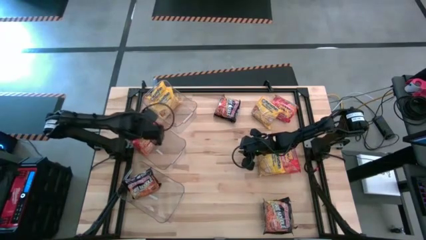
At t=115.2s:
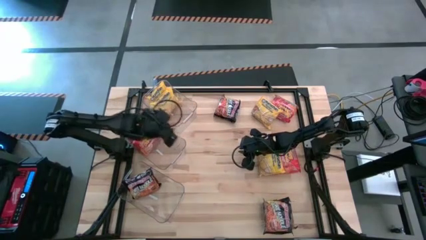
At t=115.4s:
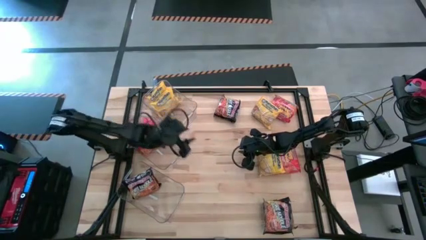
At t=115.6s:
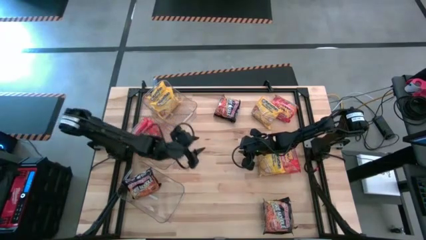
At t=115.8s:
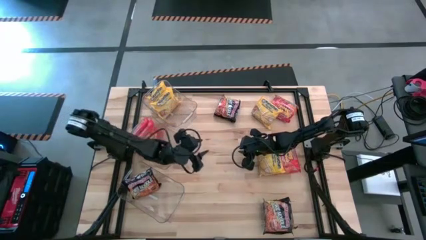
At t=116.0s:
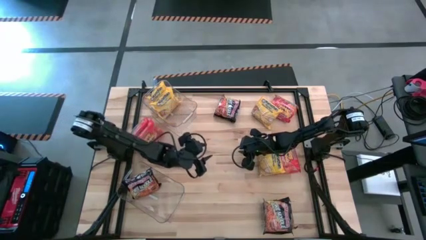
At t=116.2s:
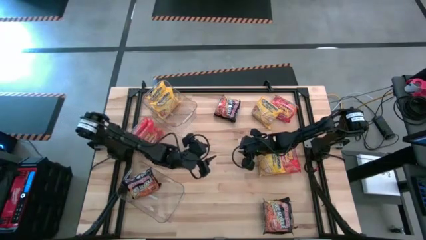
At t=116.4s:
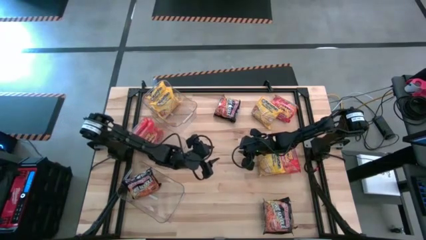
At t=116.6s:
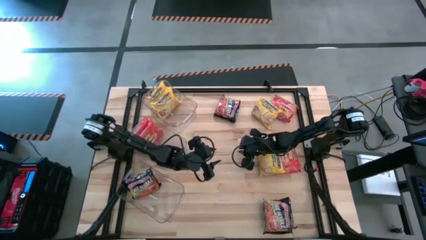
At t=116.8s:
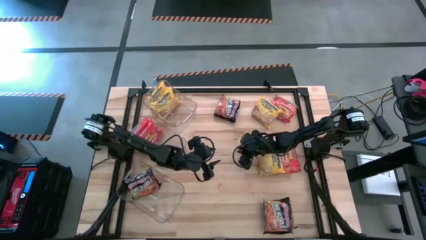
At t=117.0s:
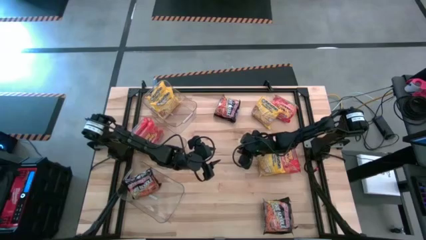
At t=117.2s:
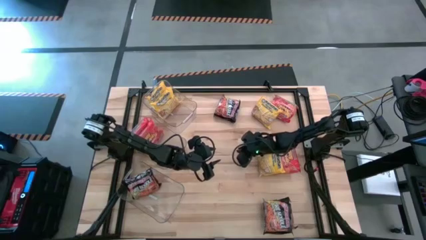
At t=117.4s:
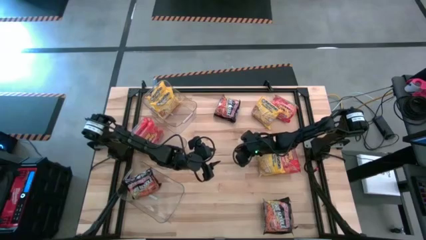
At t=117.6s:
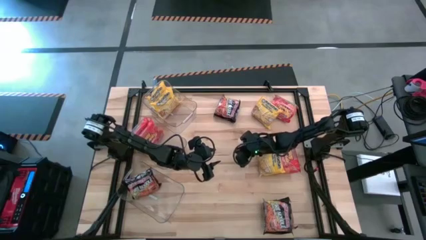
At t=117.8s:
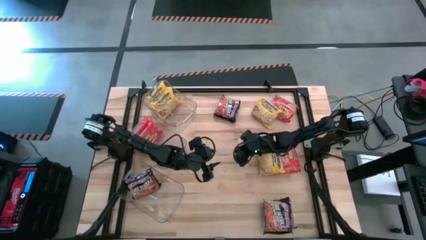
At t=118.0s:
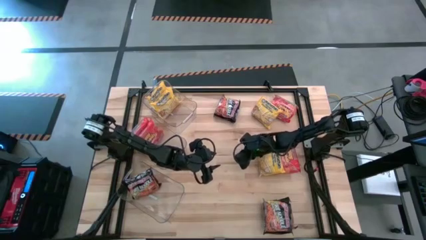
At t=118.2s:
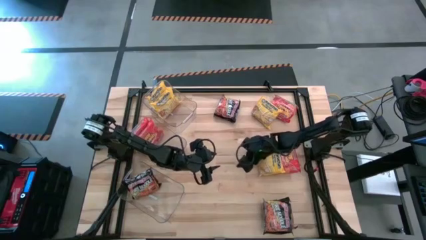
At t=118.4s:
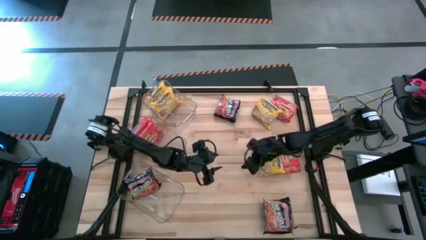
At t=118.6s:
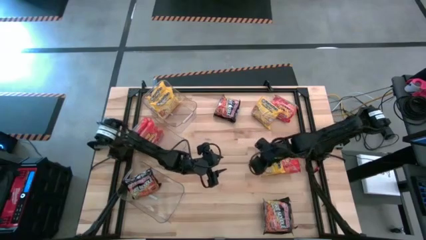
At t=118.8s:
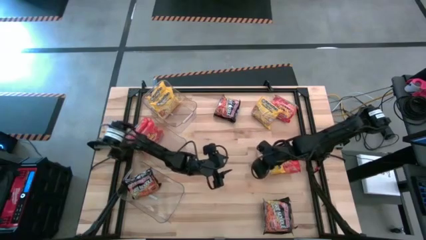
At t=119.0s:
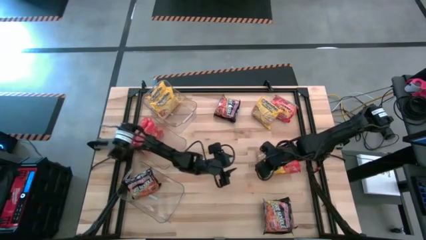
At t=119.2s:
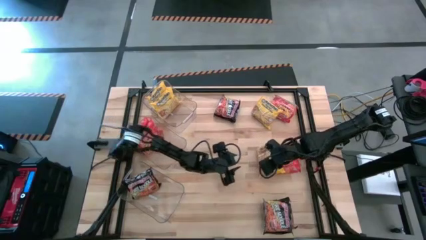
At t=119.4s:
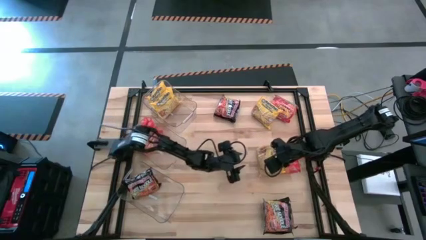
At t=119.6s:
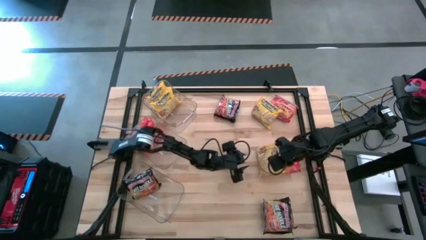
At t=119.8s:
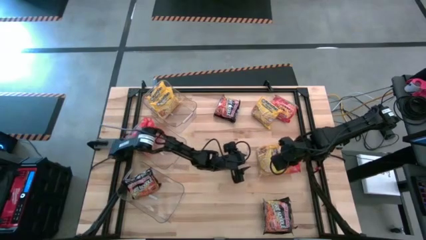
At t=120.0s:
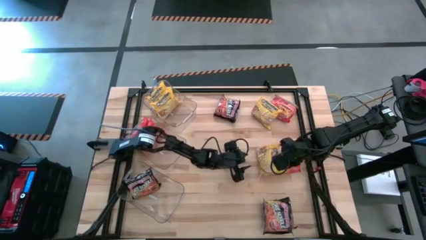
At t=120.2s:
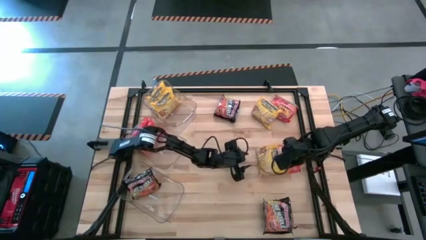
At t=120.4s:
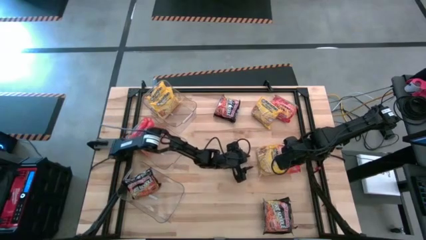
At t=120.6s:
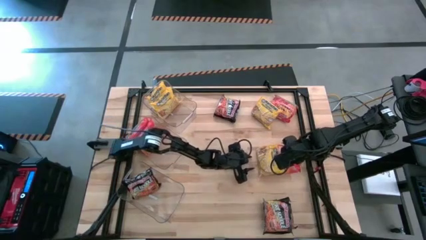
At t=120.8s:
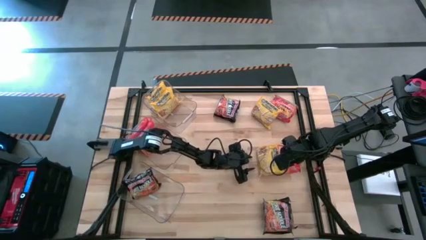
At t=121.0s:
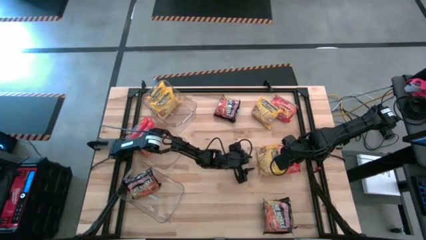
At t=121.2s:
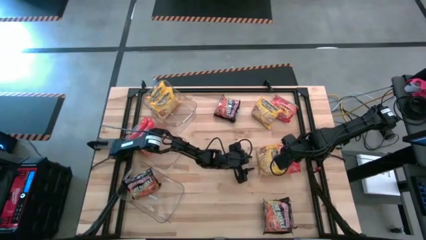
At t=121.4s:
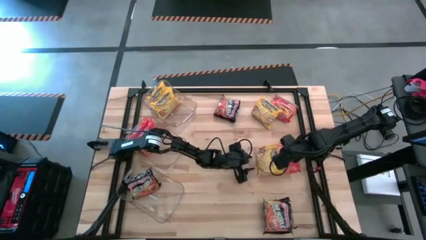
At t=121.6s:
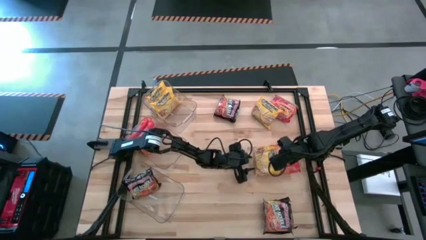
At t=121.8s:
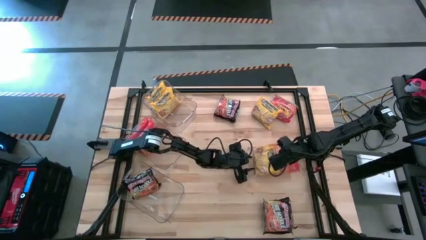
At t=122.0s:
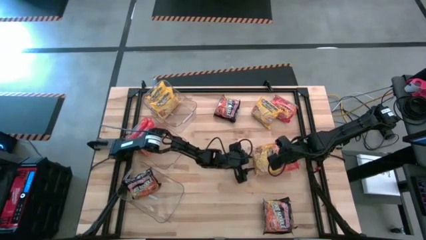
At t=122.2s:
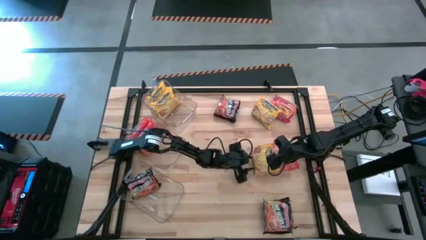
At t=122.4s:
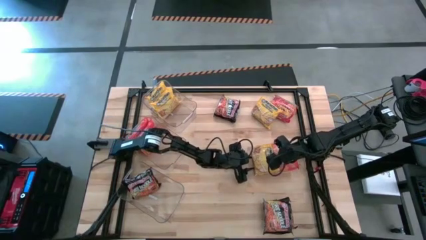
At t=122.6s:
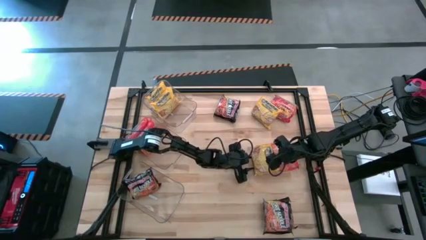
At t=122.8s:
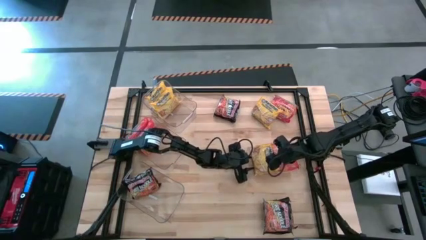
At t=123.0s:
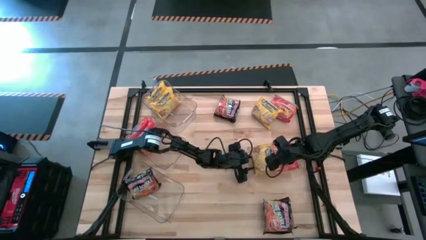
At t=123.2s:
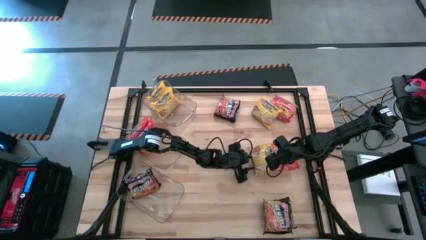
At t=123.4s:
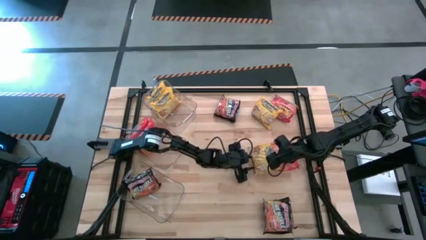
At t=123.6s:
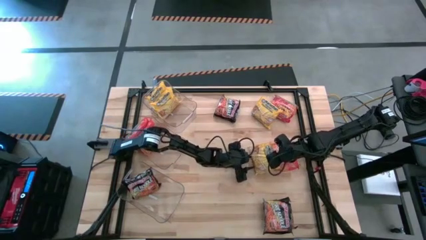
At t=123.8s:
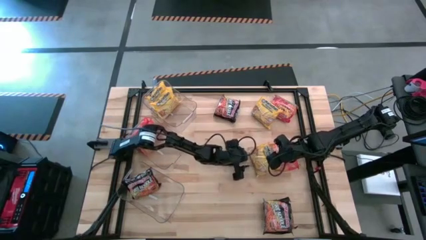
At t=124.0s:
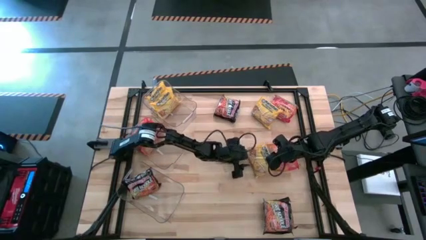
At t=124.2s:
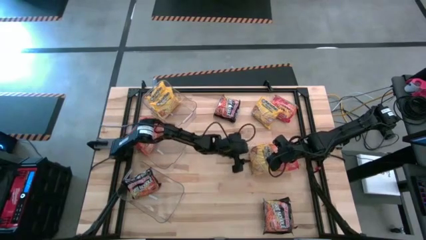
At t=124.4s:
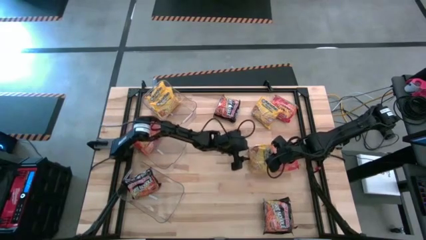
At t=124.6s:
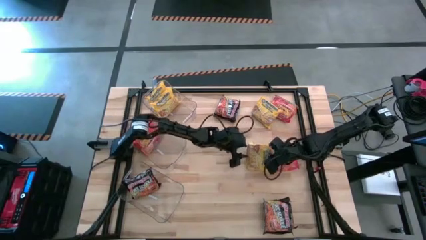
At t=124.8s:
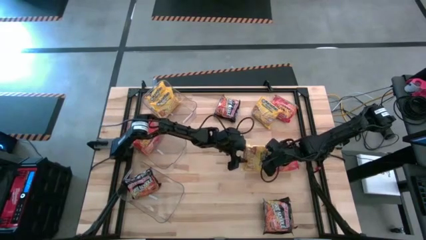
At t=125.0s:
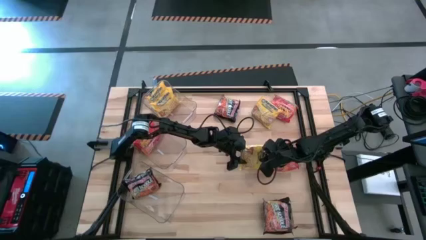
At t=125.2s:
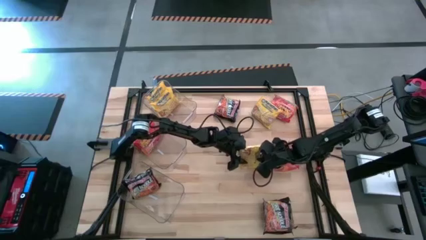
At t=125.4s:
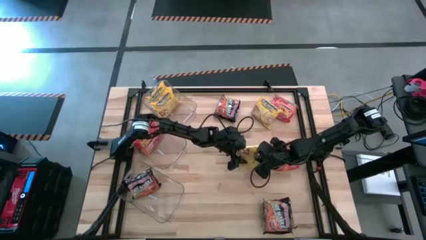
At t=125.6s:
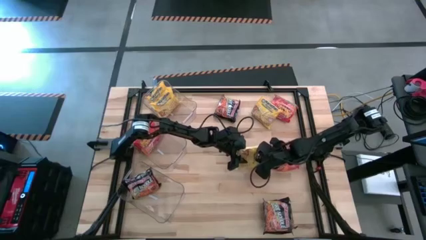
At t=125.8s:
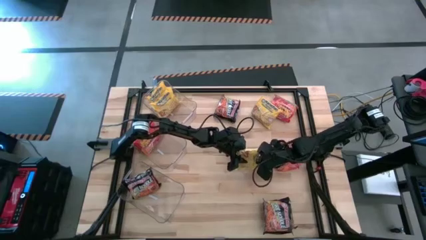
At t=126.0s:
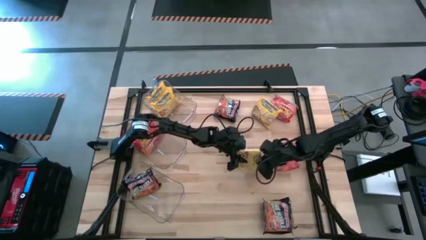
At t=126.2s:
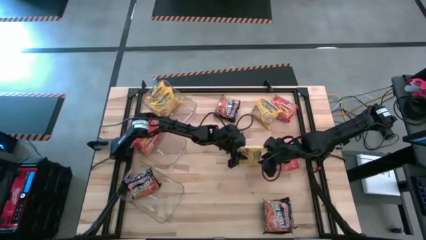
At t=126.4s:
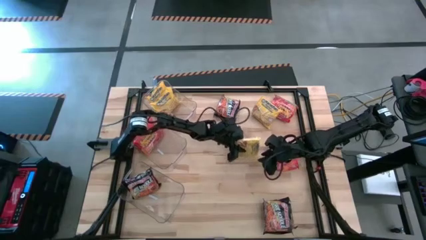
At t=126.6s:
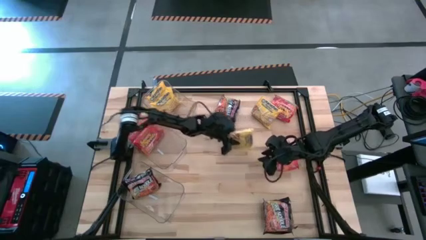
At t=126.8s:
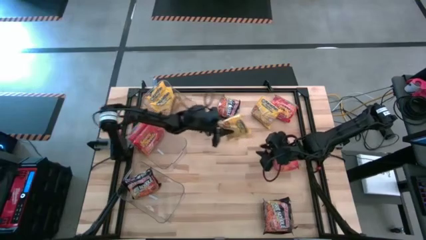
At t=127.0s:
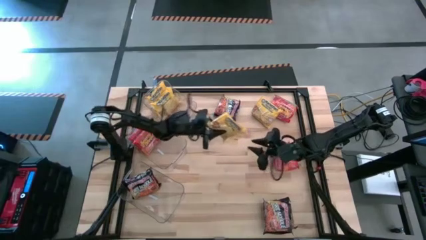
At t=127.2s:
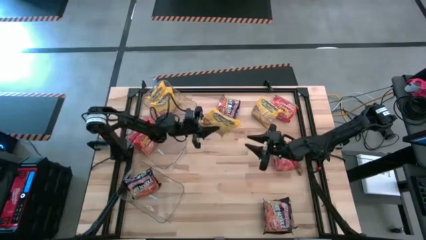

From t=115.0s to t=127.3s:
Task: Sort Maruchan noodles
Put the yellow noodles pack into the top transparent bin
